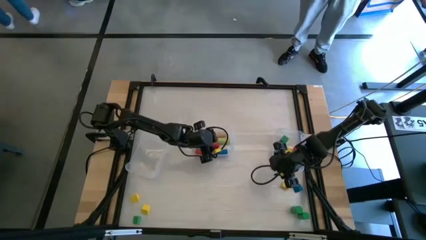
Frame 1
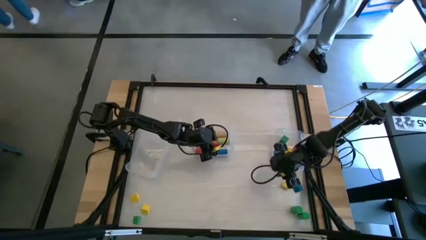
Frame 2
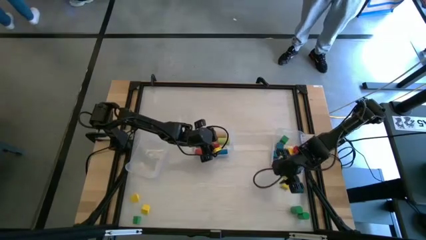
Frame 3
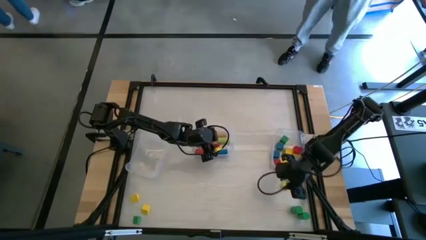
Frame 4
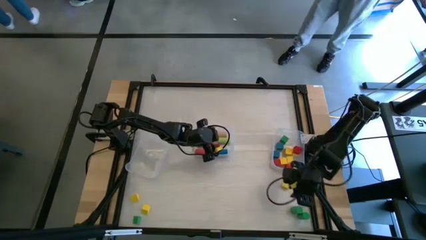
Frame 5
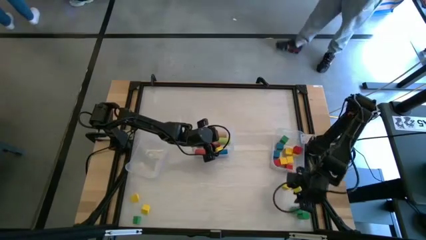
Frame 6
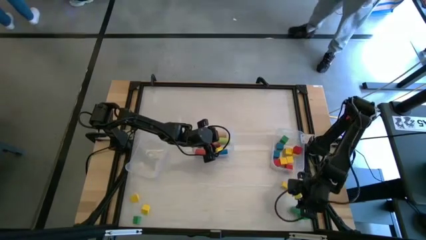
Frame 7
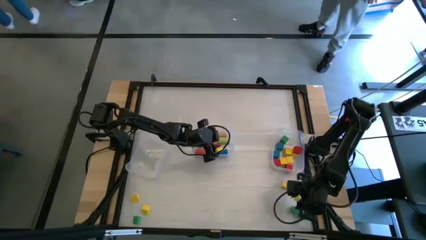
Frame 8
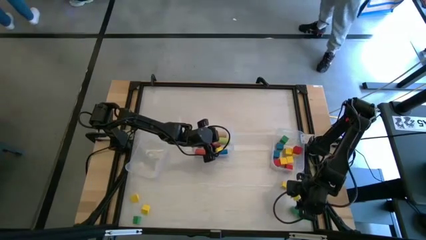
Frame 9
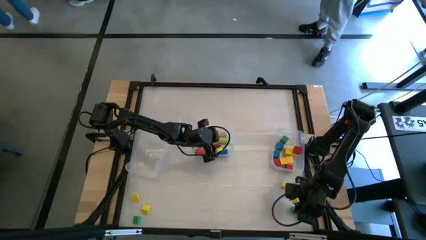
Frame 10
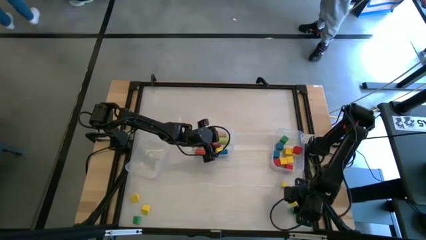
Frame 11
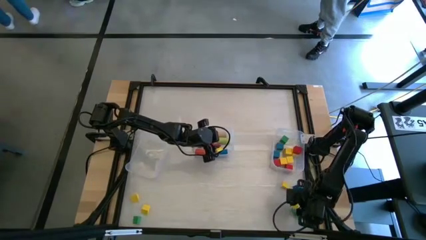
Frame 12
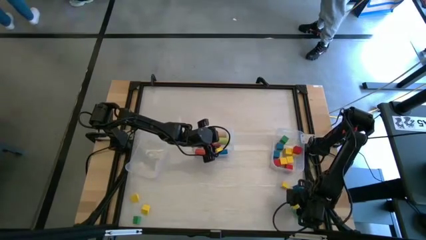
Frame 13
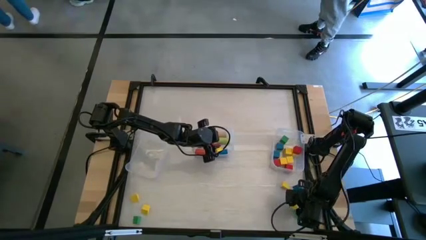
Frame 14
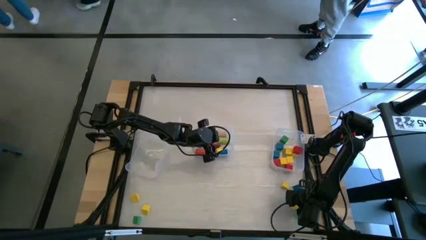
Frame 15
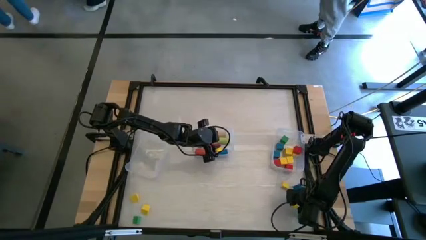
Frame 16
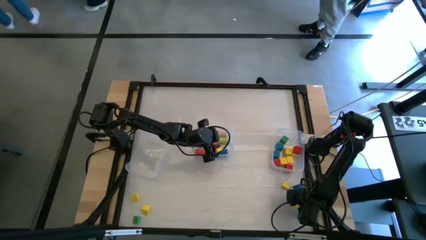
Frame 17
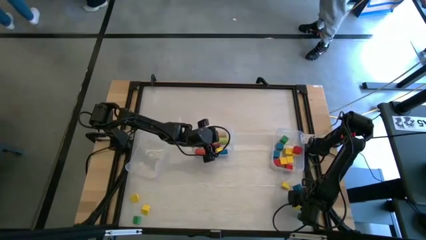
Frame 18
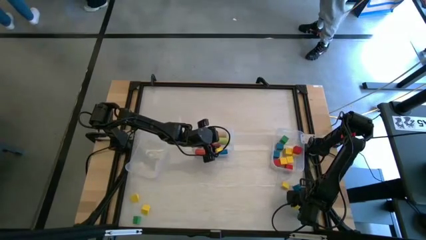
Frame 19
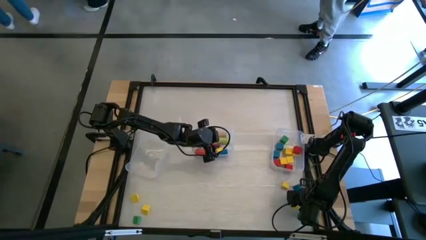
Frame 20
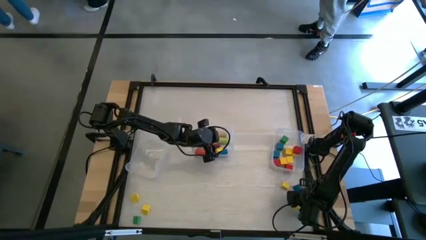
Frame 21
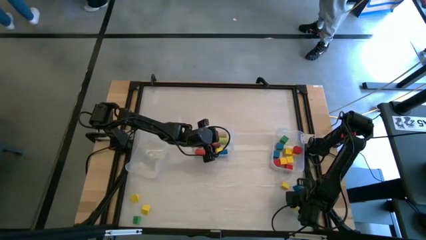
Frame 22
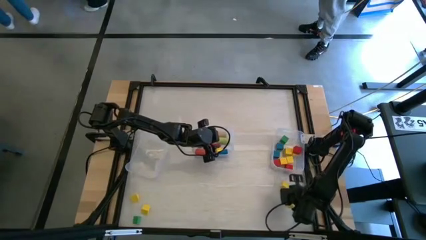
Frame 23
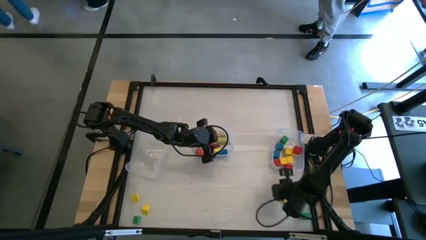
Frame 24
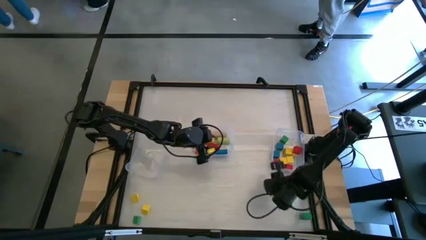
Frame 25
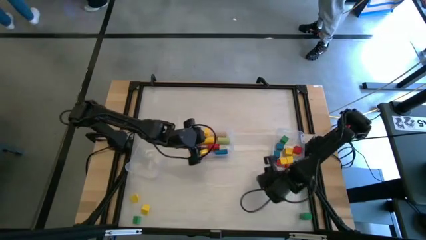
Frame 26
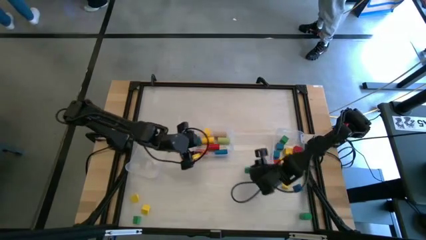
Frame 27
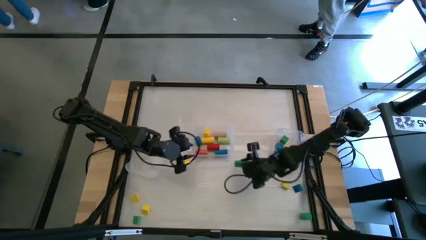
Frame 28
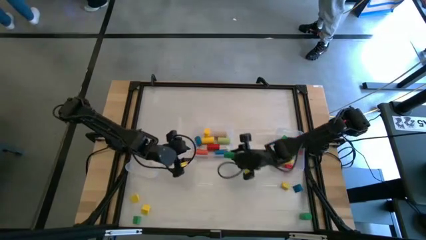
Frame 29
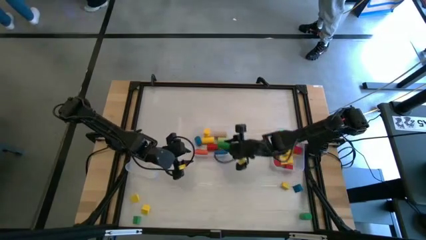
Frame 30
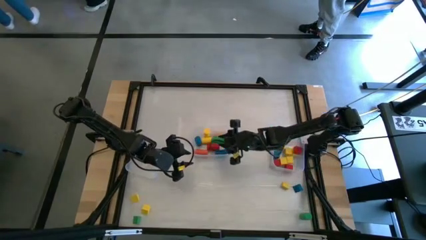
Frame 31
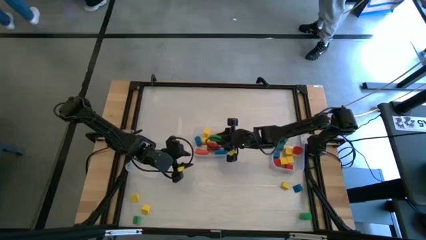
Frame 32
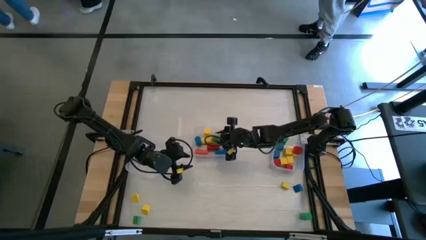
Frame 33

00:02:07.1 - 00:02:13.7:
Task: Sort blocks by size
Put the green cylinder block into the center transparent bin

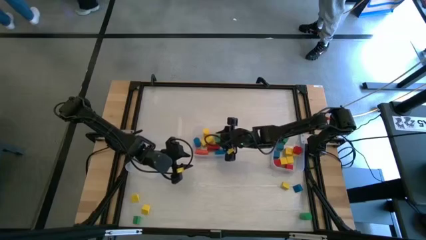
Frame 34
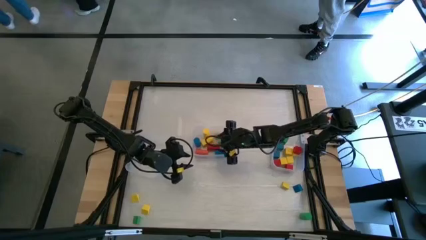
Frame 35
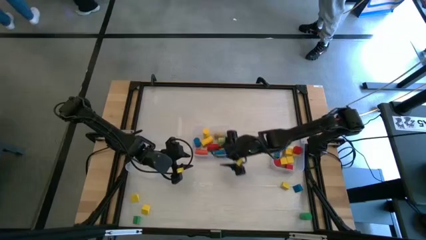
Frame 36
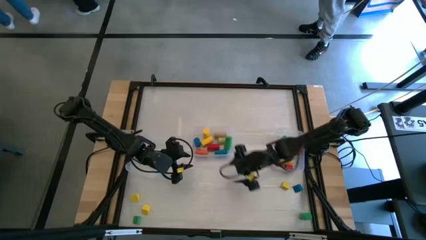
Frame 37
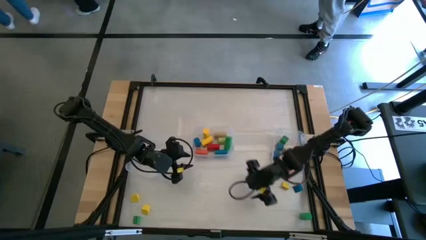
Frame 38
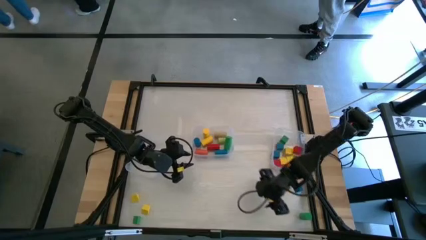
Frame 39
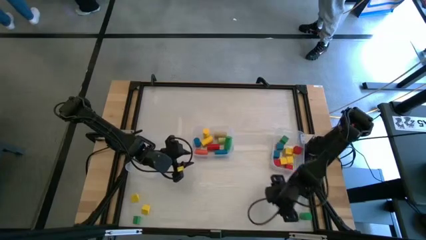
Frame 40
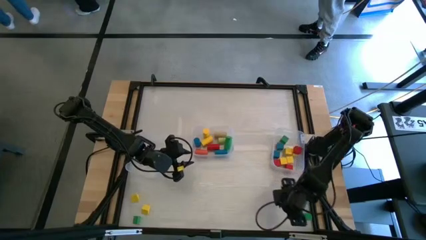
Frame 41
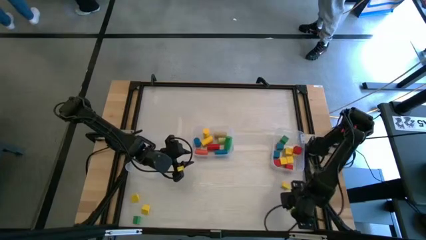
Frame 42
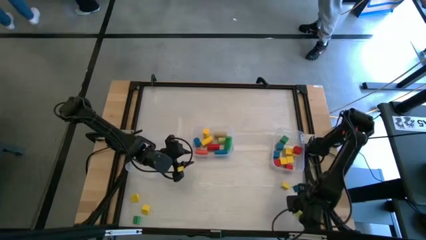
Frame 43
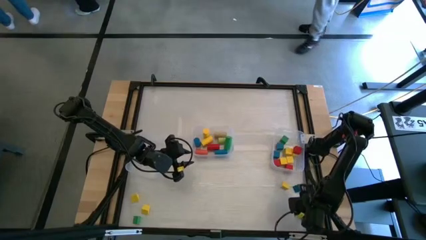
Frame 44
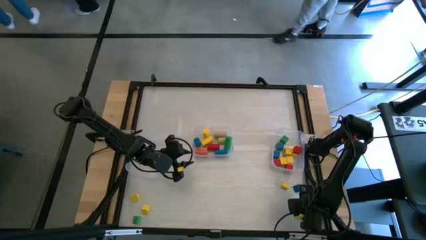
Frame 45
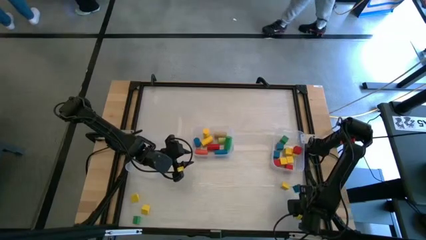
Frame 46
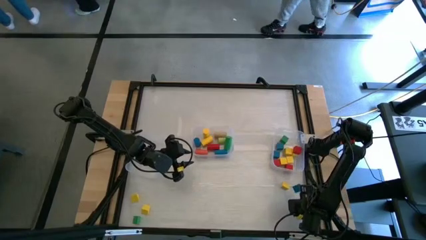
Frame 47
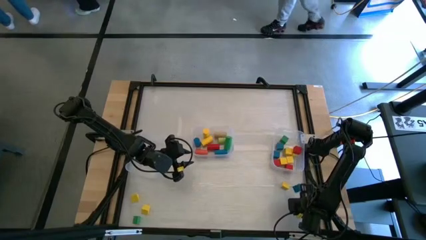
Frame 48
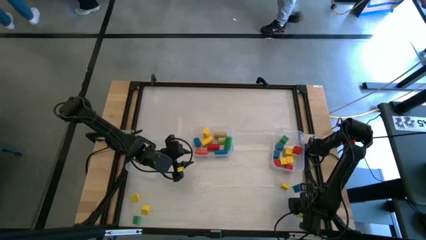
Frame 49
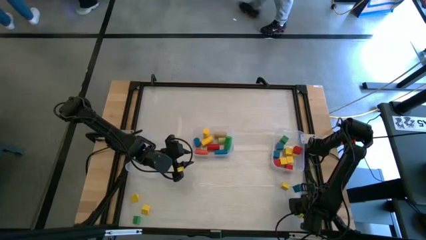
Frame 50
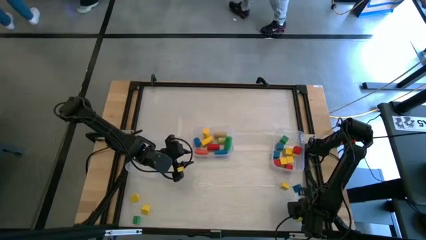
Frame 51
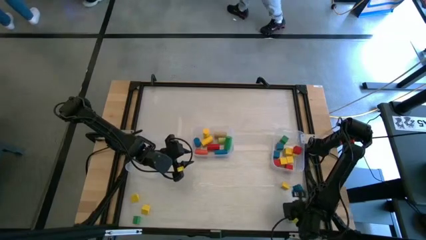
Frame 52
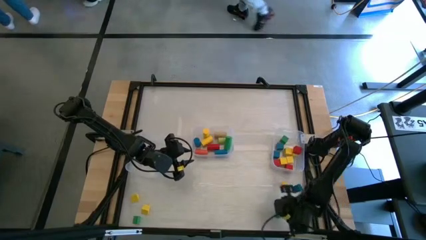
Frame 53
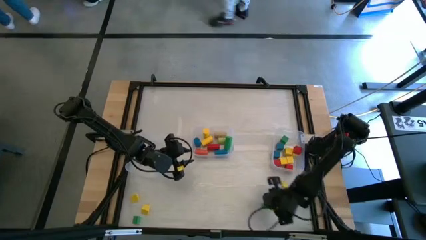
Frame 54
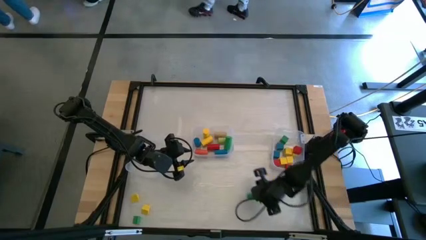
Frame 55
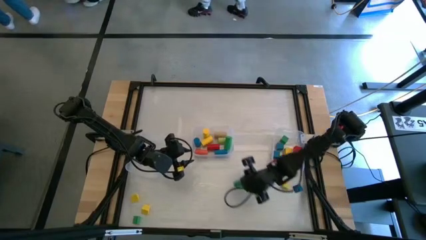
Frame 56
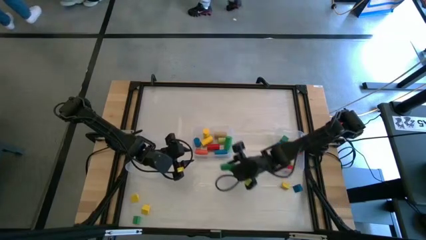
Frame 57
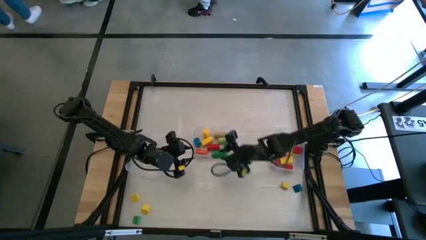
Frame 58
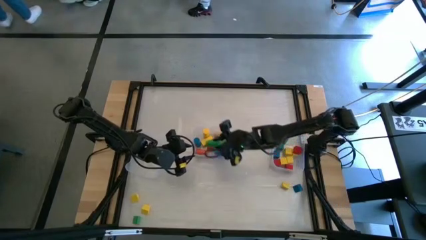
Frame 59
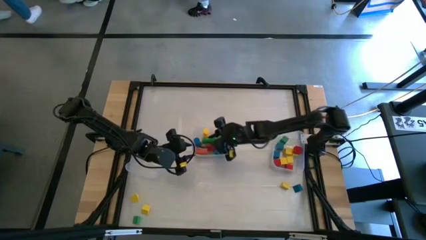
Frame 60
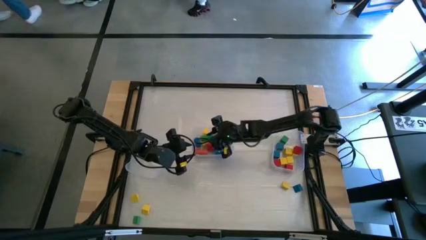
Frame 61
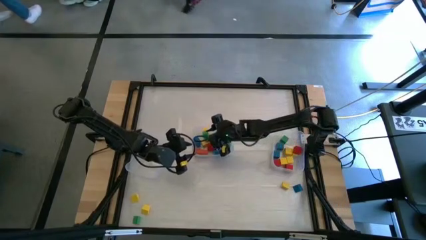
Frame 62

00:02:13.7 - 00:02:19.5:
Put the green cylinder block into the center transparent bin

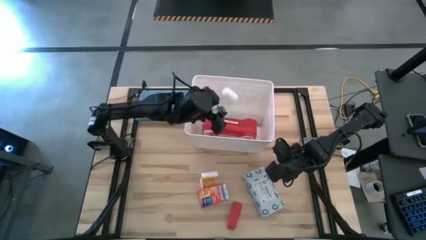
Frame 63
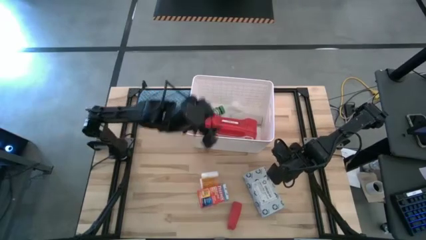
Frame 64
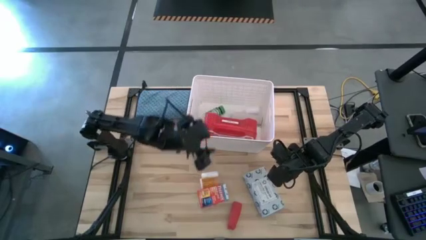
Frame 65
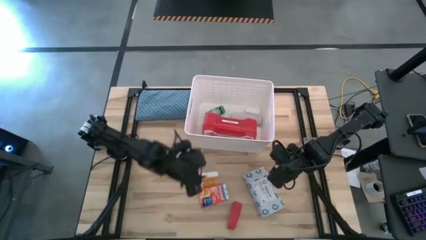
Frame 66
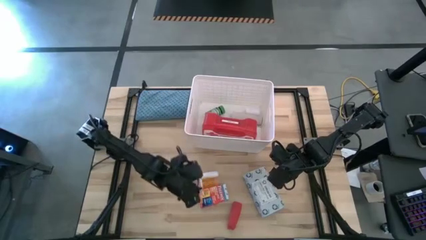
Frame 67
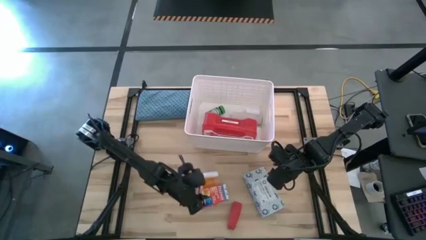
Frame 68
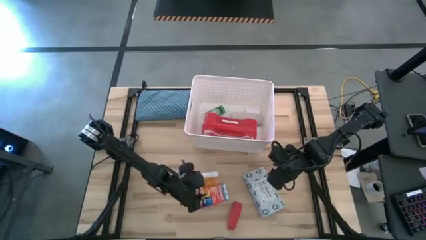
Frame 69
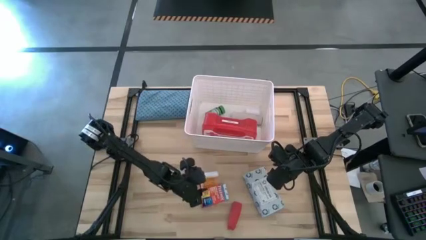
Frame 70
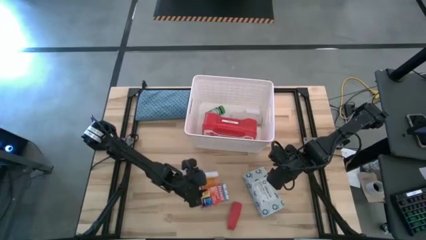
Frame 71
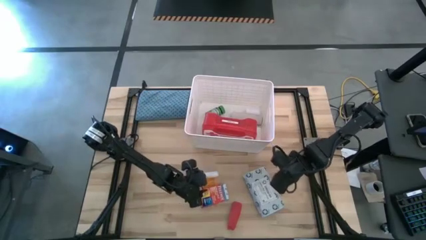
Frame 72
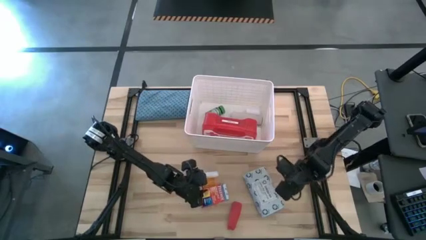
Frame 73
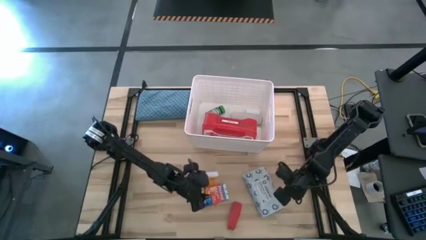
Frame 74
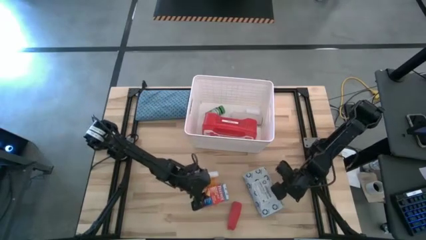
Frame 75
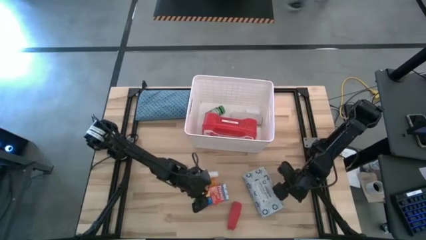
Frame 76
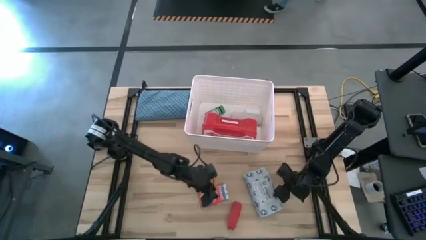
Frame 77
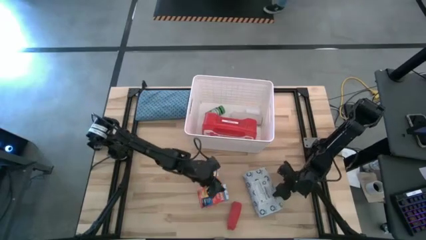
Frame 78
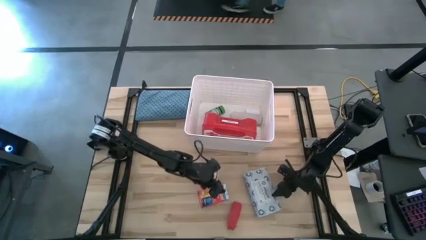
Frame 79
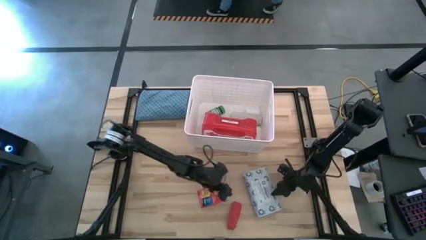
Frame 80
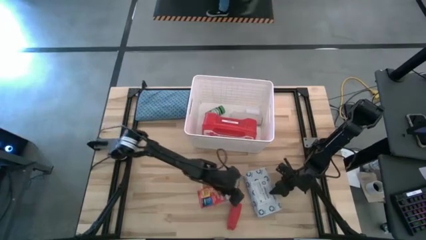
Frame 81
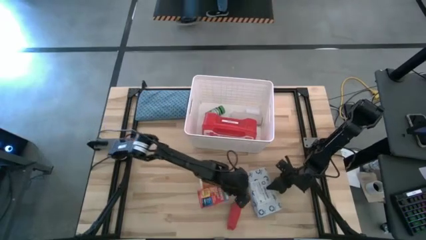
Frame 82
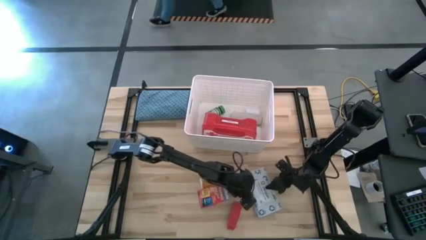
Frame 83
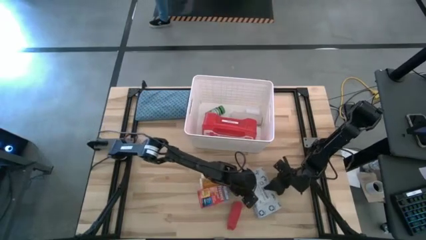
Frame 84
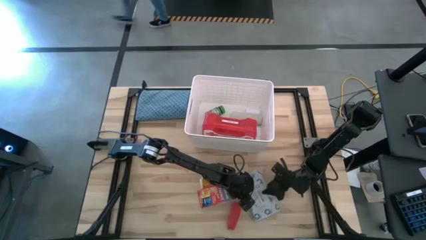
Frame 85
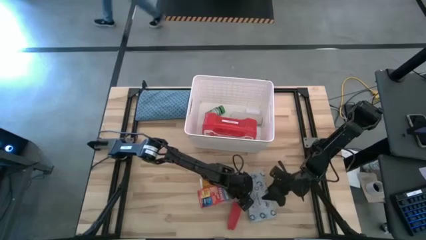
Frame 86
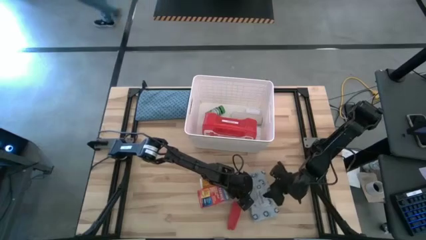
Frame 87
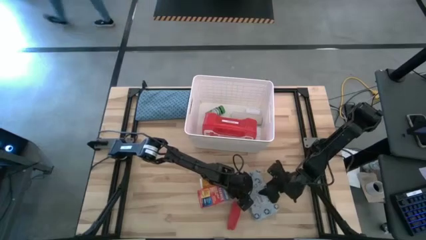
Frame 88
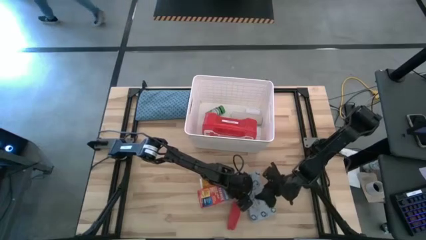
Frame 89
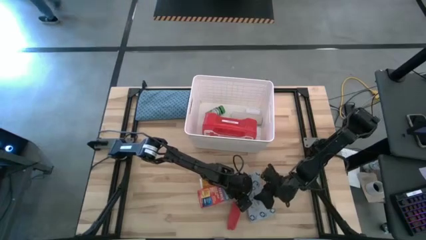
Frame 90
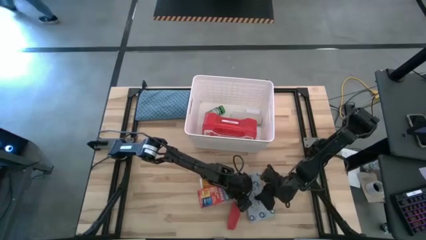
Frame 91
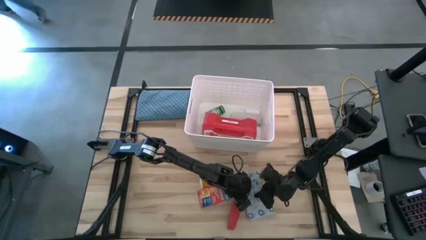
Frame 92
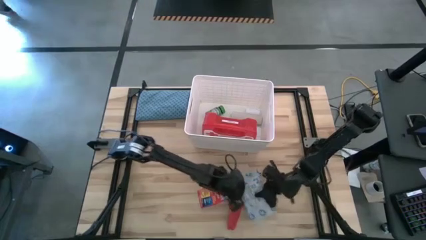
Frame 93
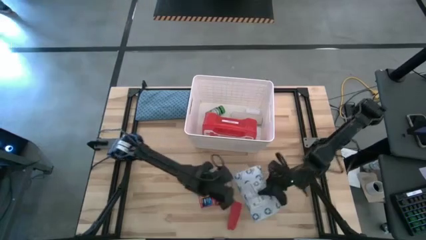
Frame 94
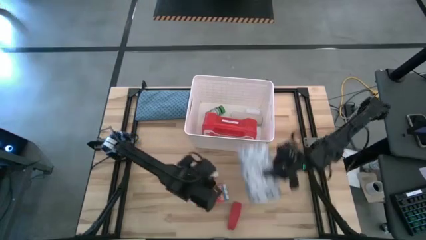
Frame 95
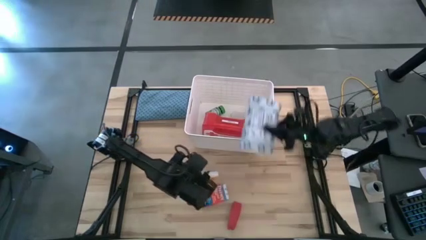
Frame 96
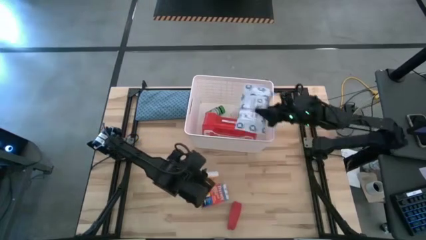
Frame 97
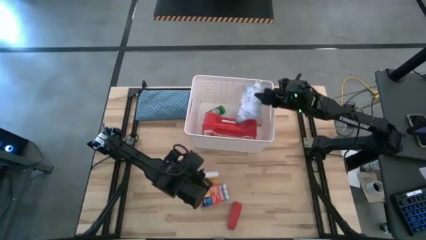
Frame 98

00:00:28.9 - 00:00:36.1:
Task: Pick & place medical supplies in basket/bin
Put the mailer bag into the white bin
